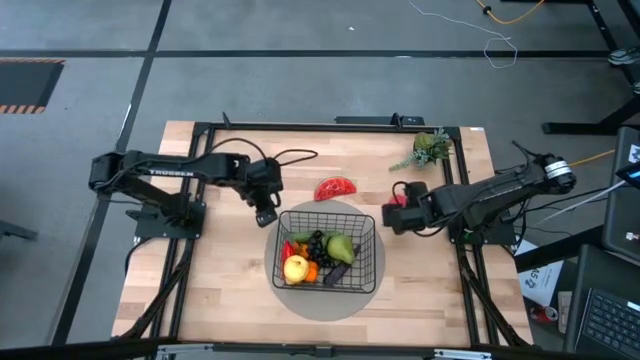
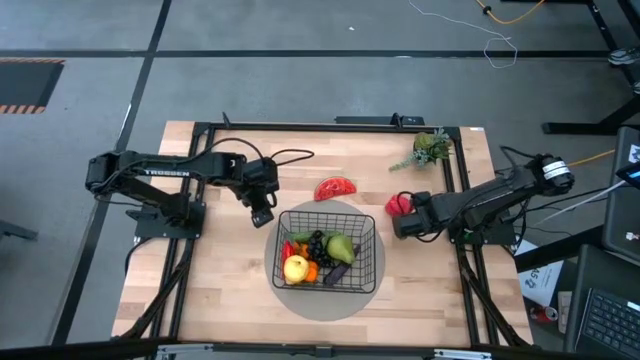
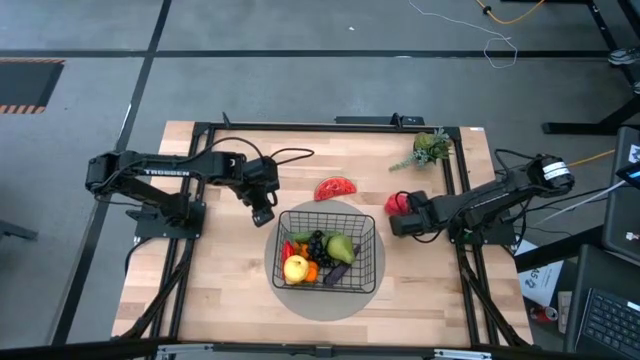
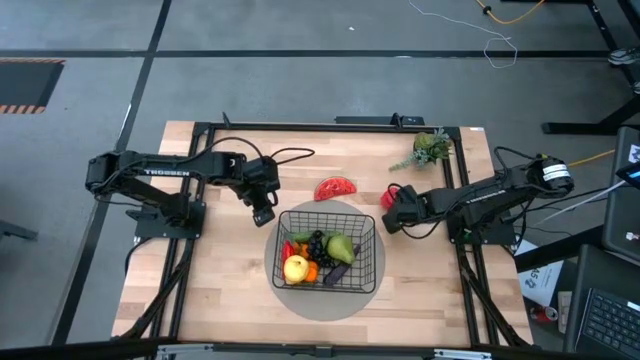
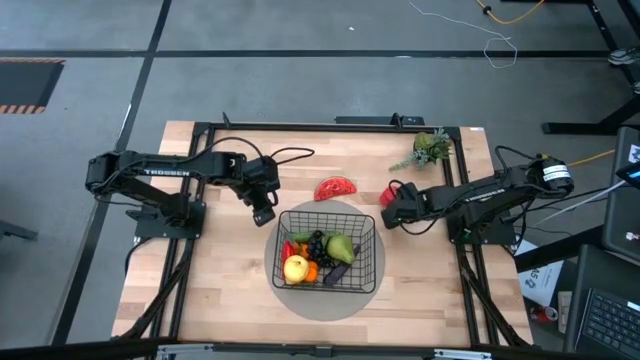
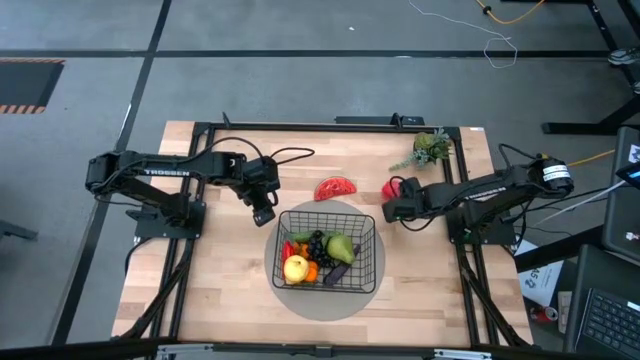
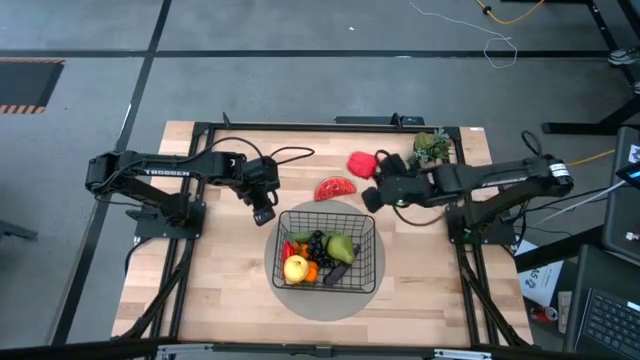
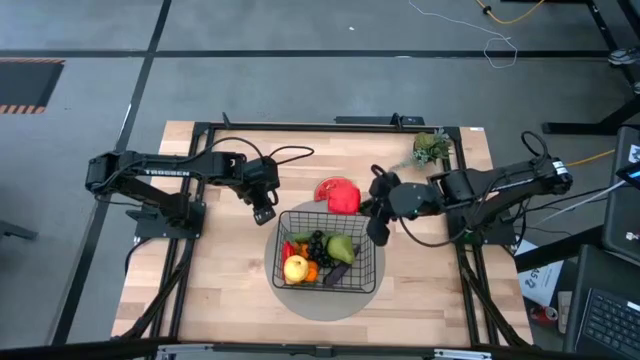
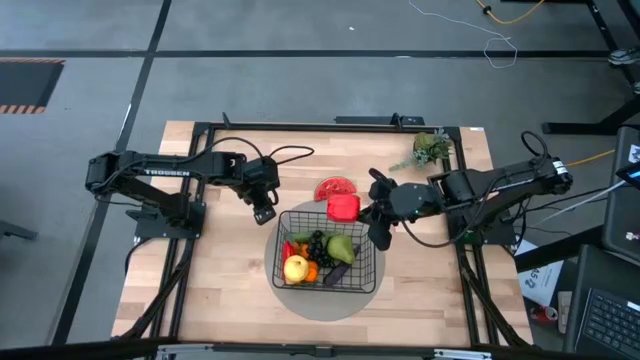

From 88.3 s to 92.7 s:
Task: Build produce basket
Put the red bell pepper into the black wire basket

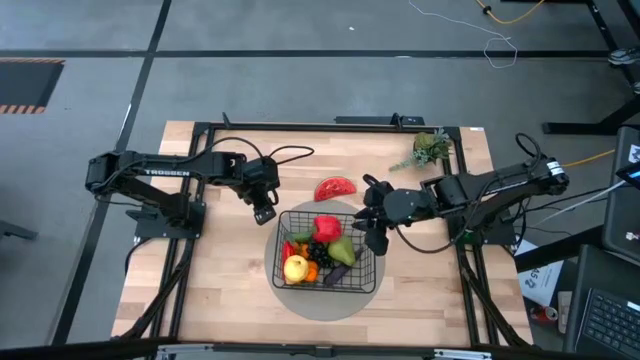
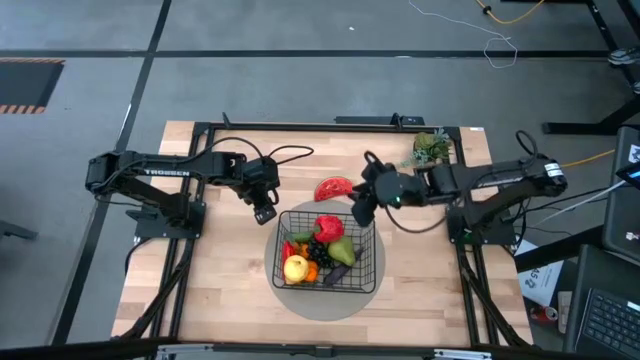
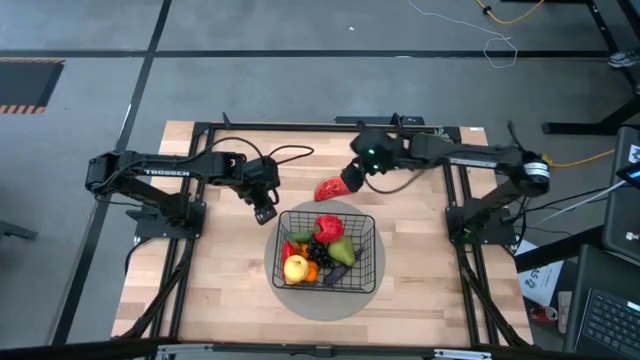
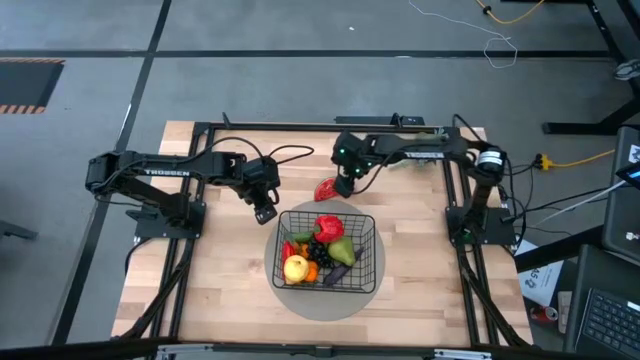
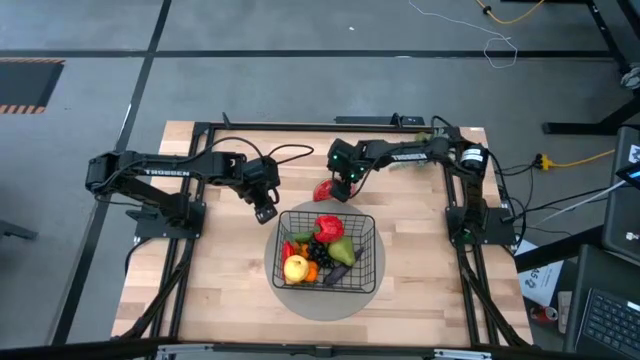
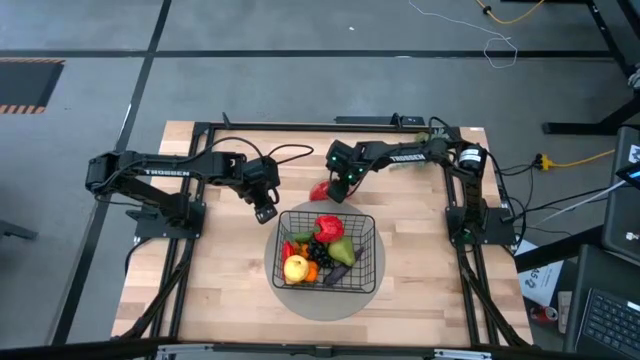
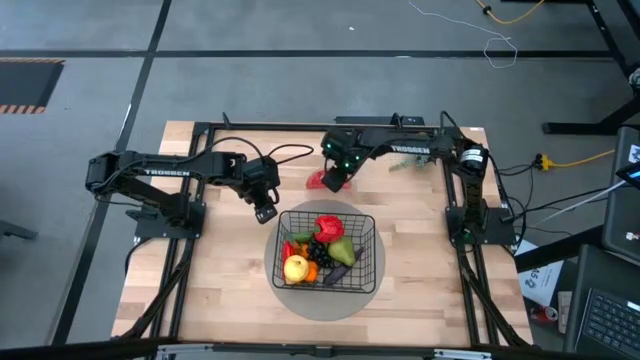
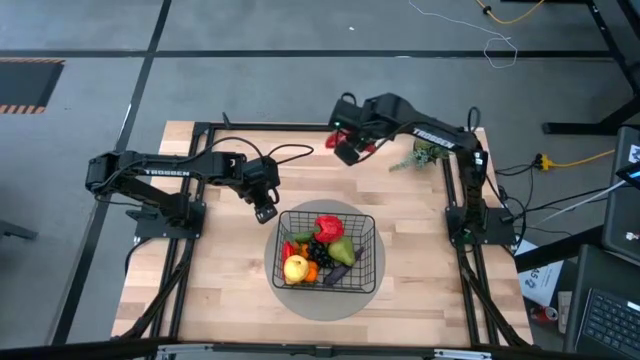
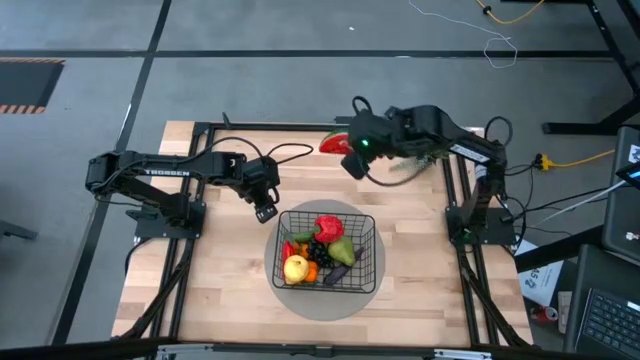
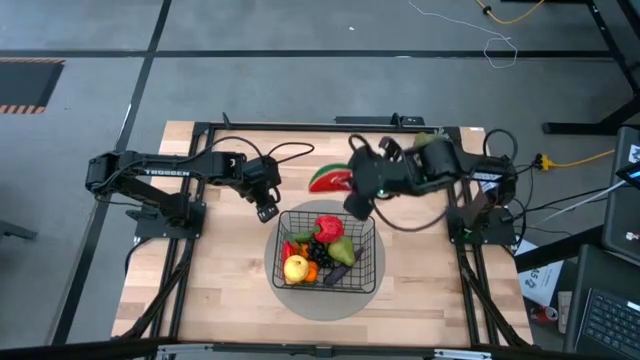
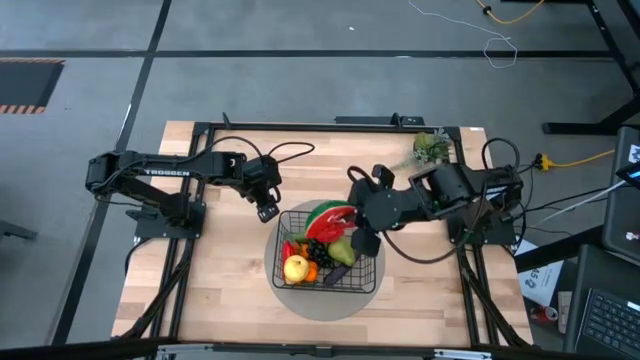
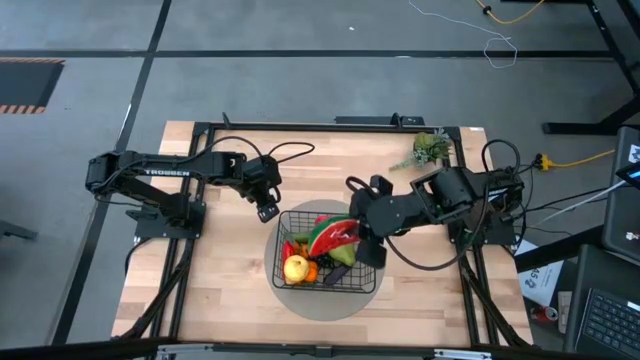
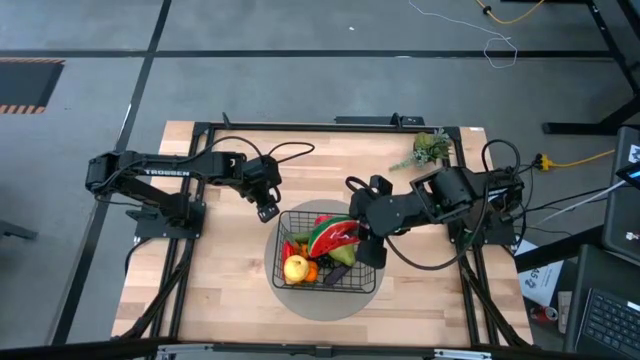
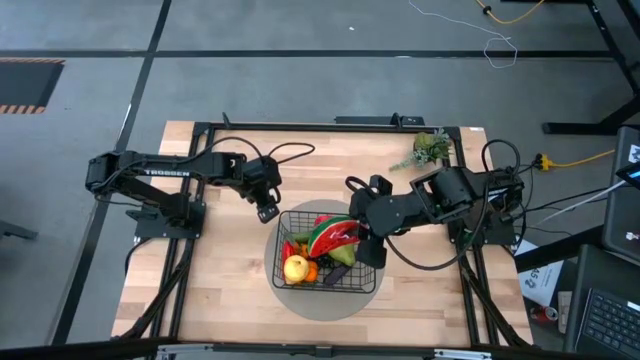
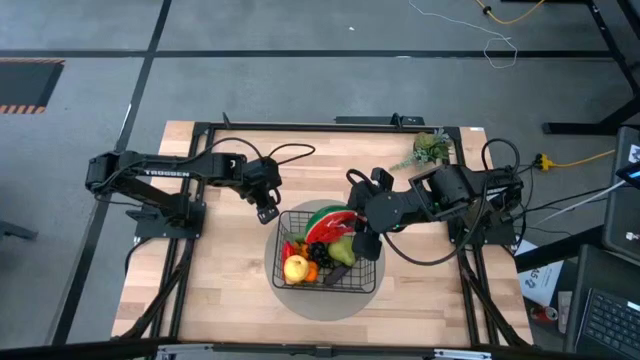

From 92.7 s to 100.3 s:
Put the red watermelon into the black wire basket

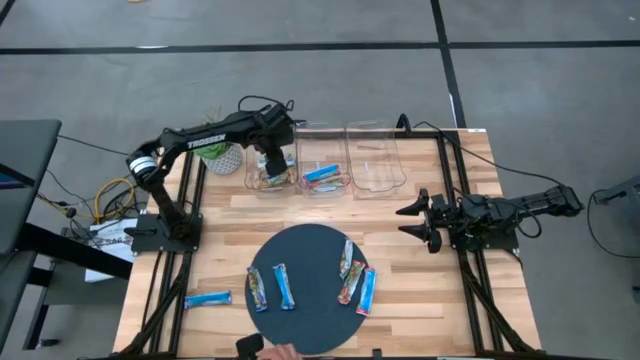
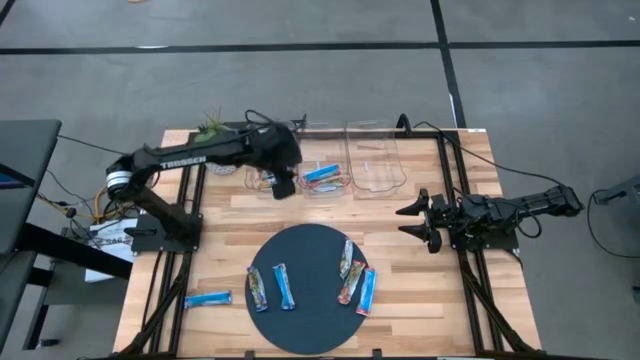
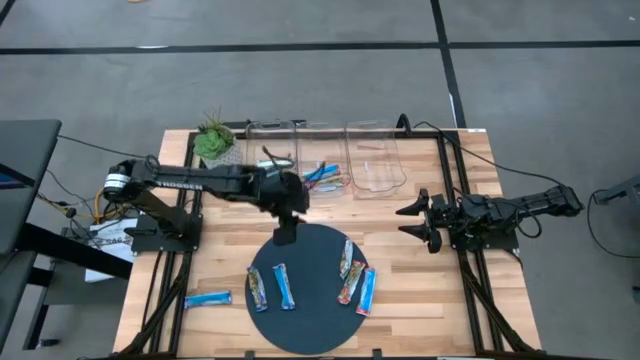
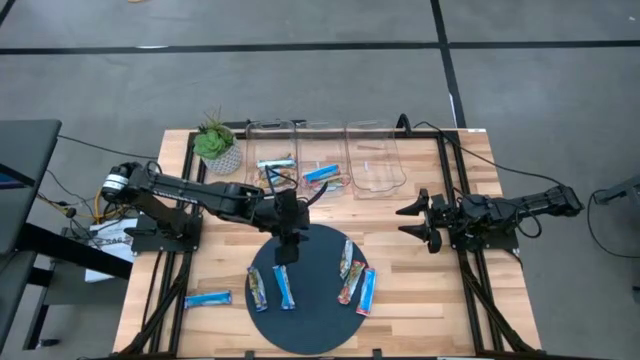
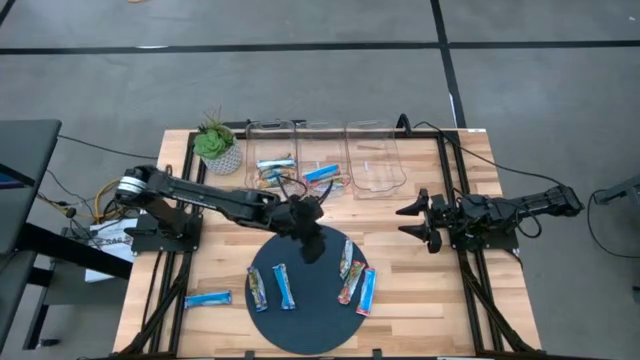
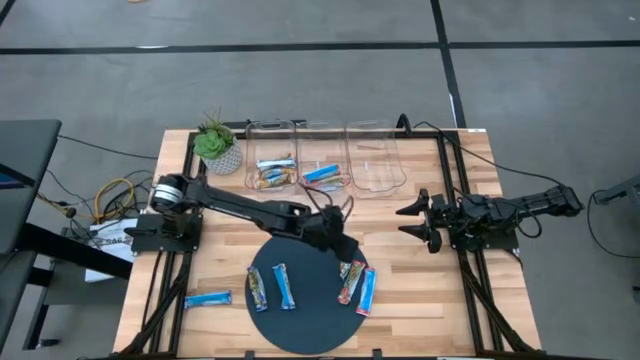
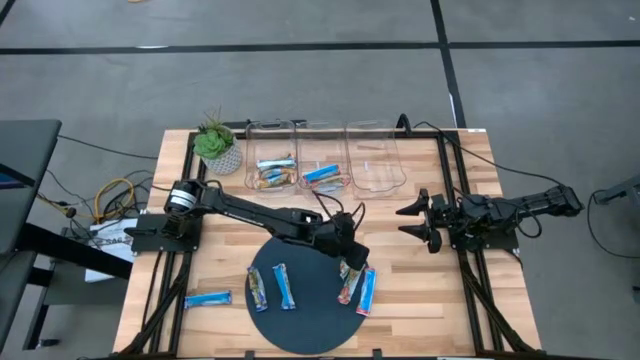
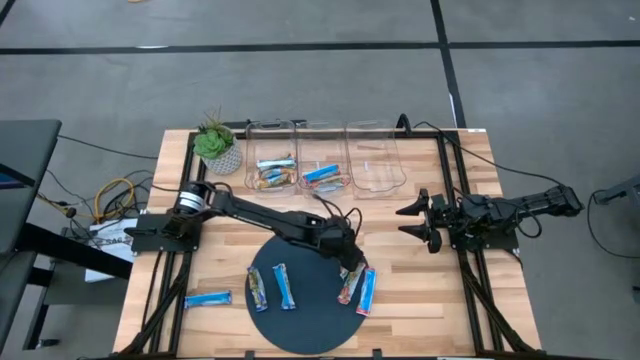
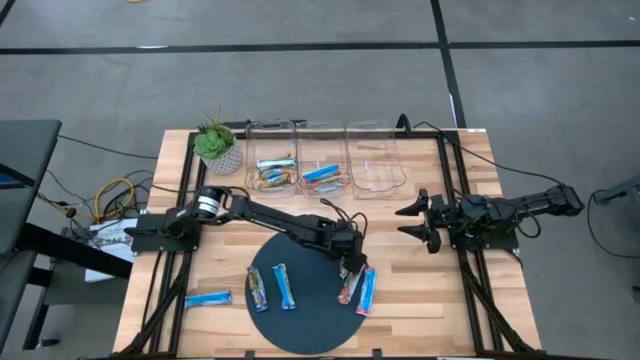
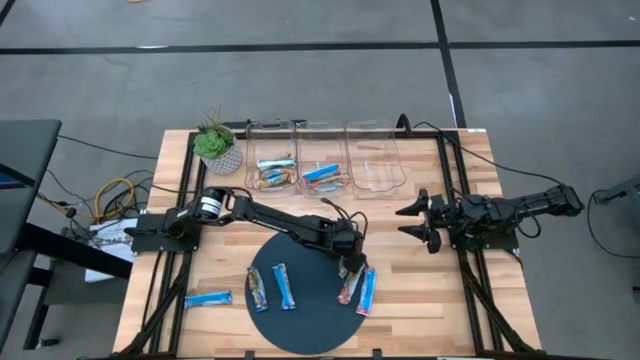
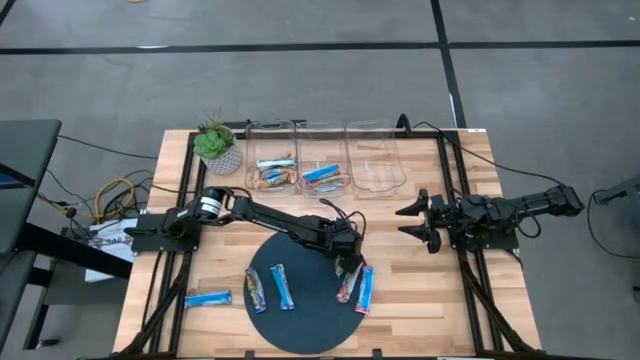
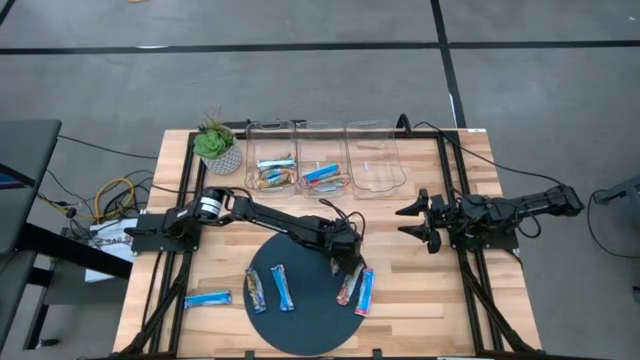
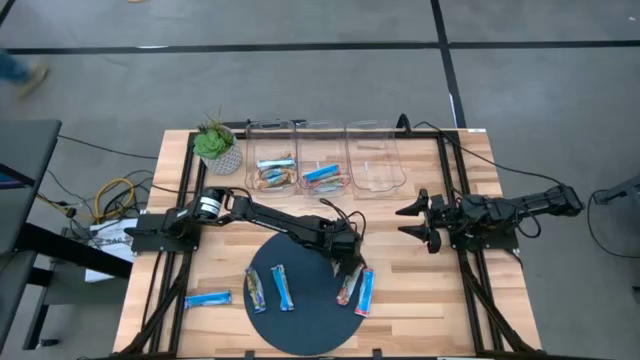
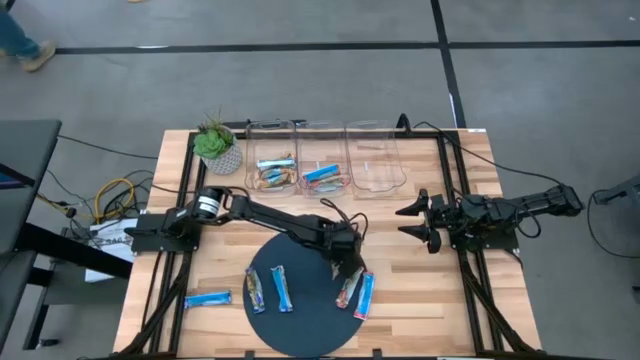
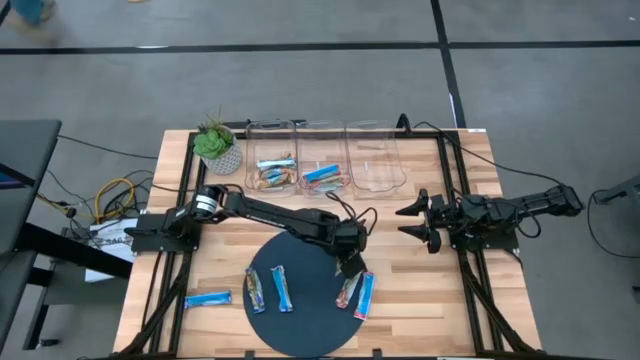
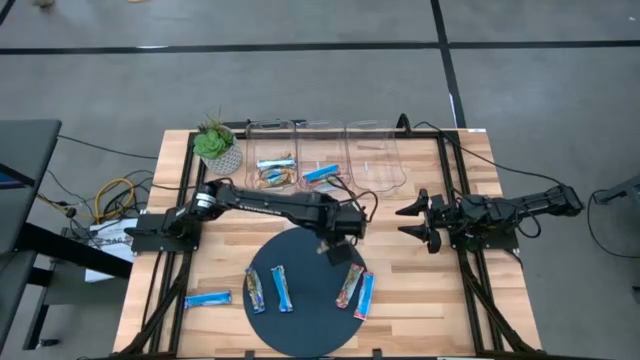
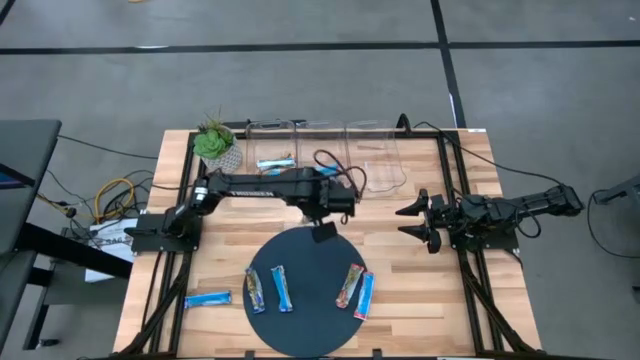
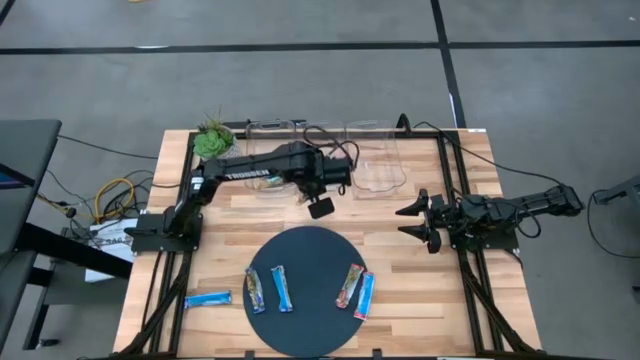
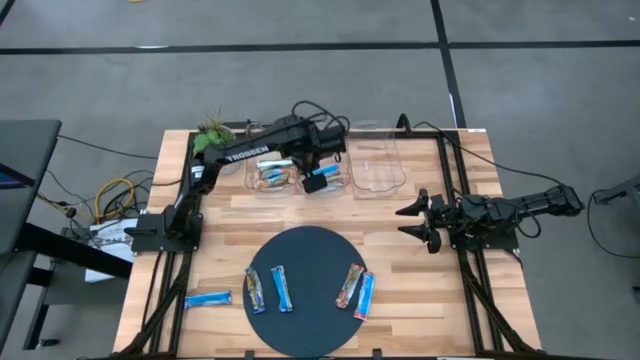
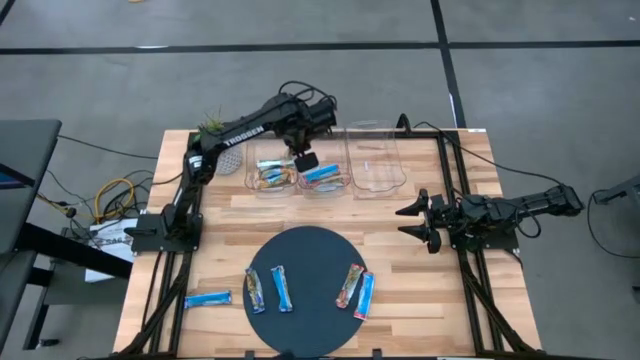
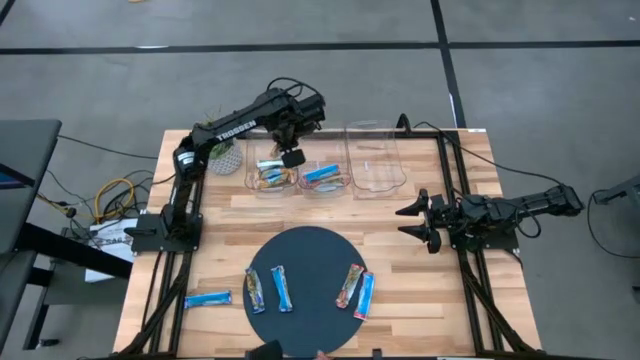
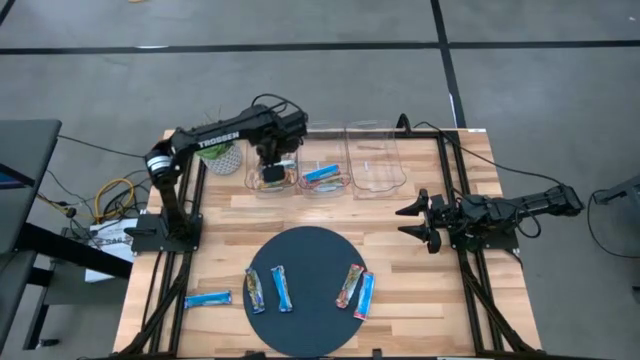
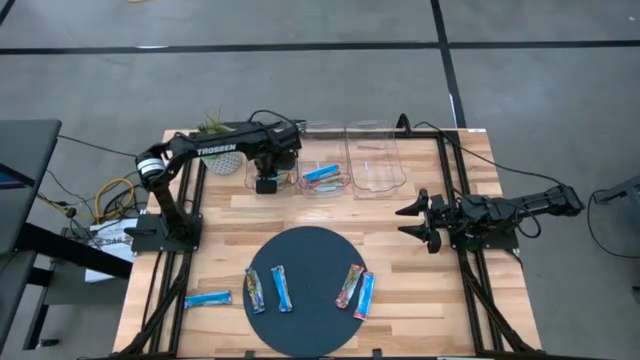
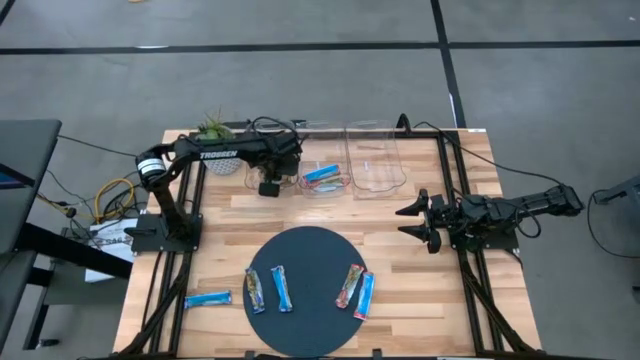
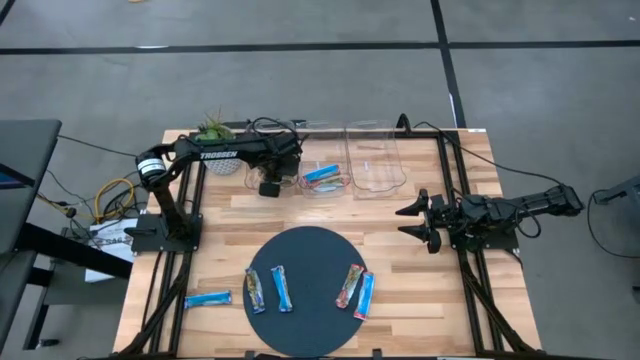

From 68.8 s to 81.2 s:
Task: Pick and place Granola Bars by type
Put the orange bar into the left transparent bin
